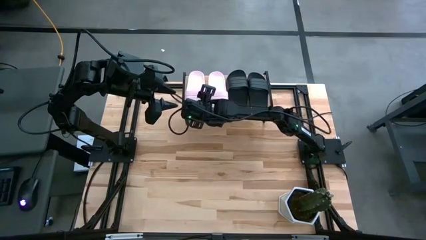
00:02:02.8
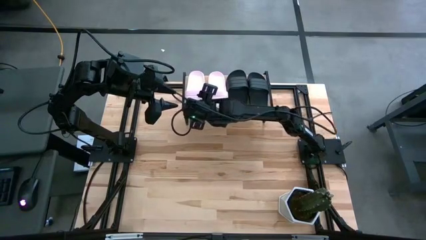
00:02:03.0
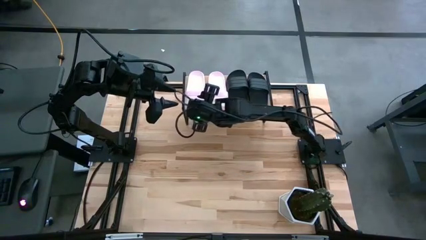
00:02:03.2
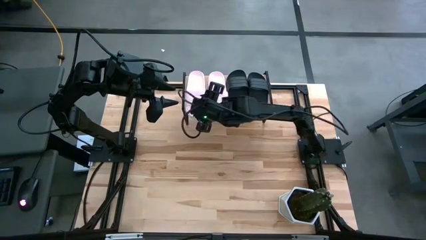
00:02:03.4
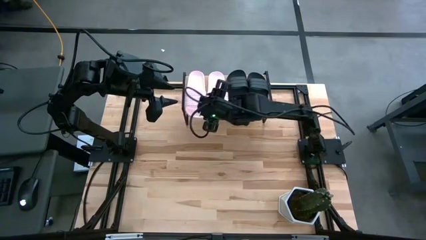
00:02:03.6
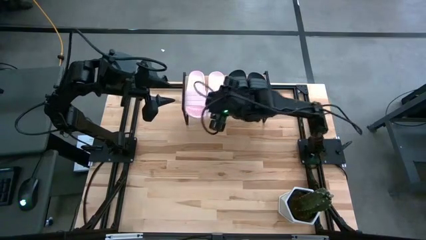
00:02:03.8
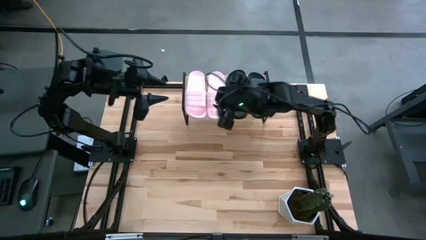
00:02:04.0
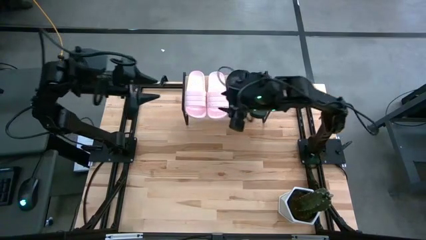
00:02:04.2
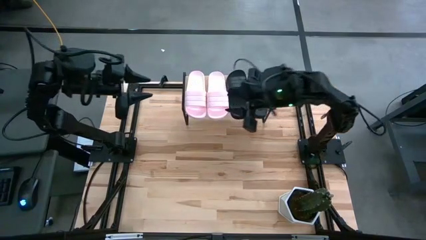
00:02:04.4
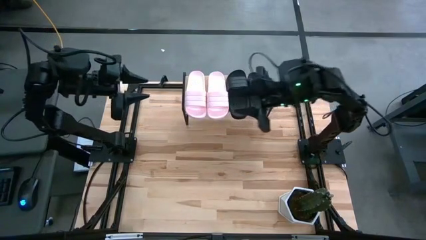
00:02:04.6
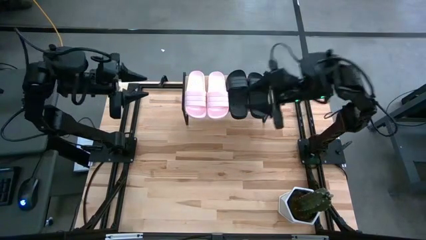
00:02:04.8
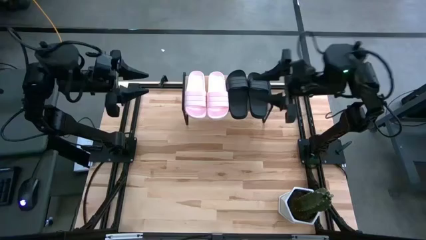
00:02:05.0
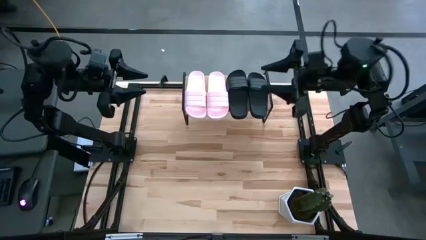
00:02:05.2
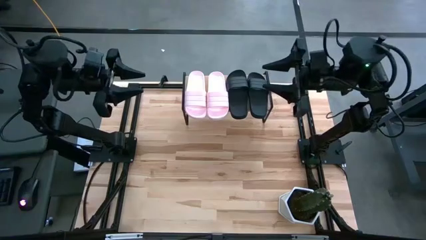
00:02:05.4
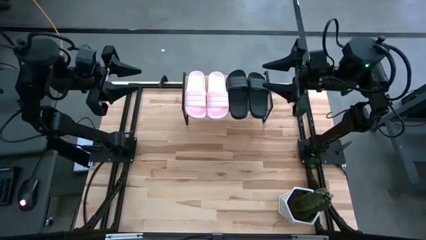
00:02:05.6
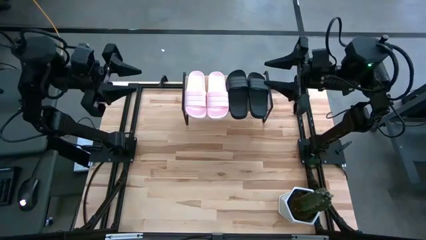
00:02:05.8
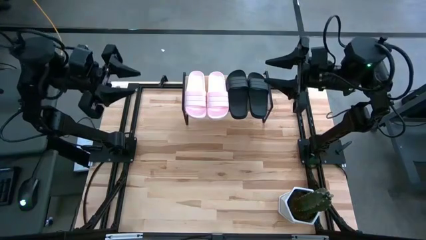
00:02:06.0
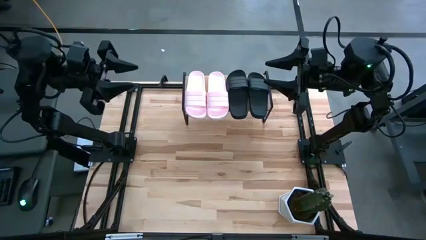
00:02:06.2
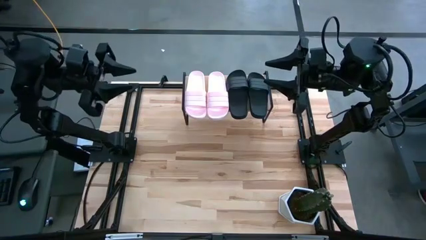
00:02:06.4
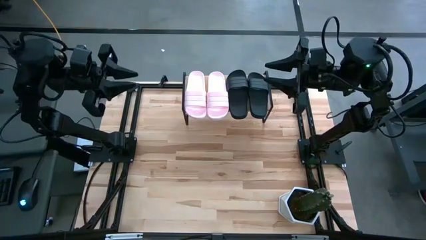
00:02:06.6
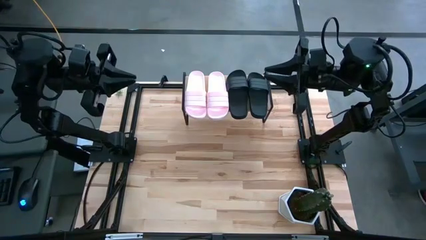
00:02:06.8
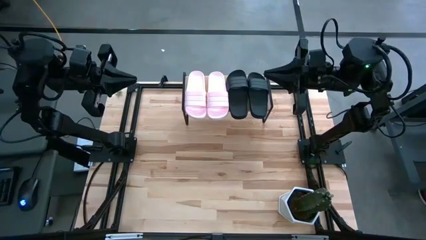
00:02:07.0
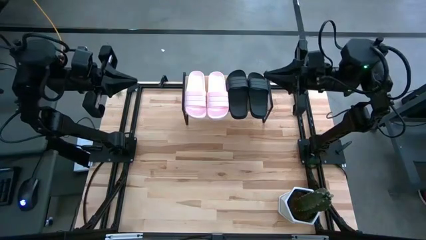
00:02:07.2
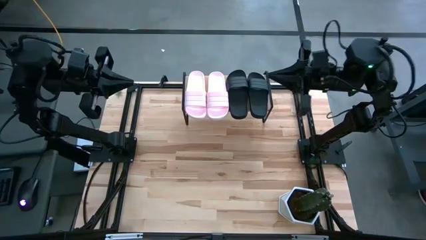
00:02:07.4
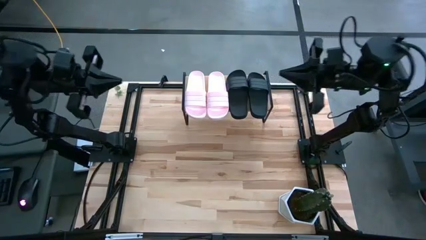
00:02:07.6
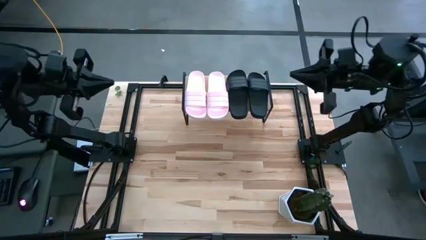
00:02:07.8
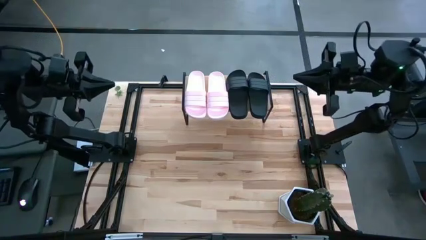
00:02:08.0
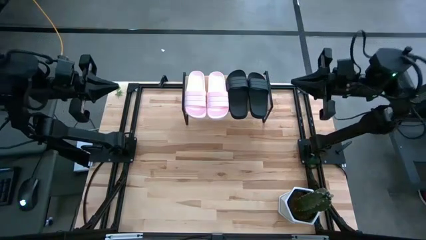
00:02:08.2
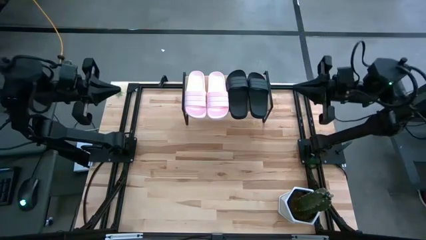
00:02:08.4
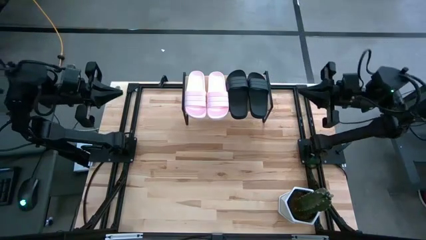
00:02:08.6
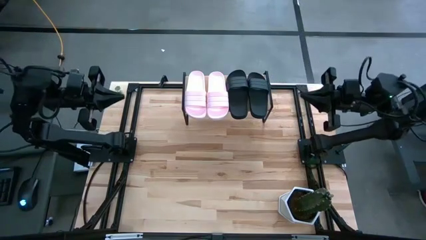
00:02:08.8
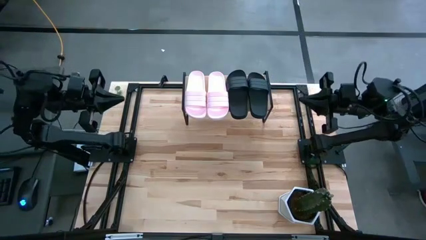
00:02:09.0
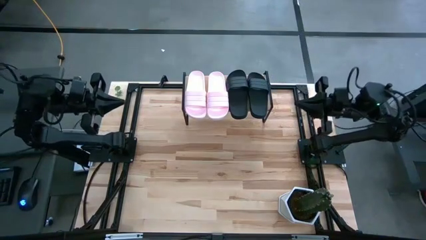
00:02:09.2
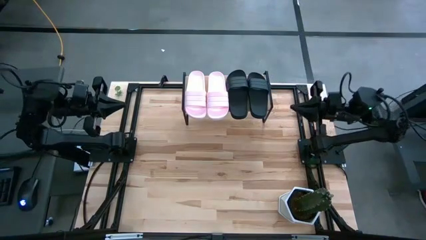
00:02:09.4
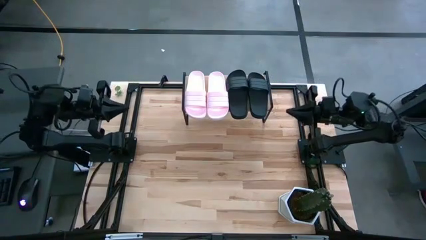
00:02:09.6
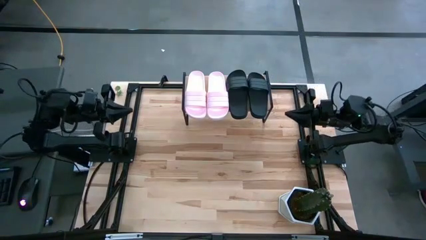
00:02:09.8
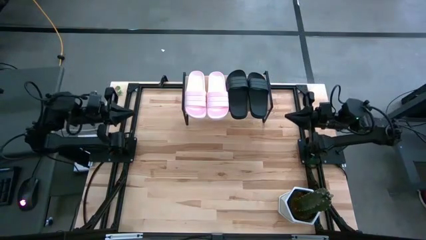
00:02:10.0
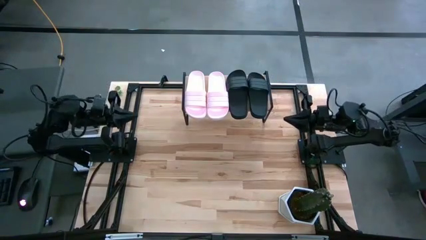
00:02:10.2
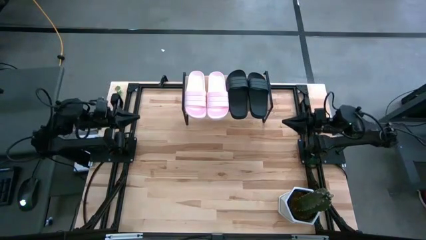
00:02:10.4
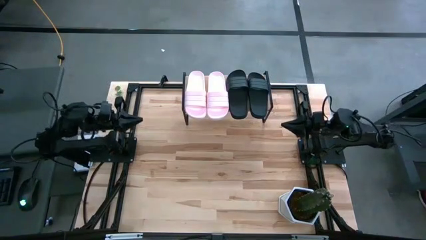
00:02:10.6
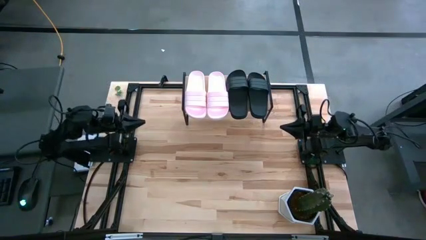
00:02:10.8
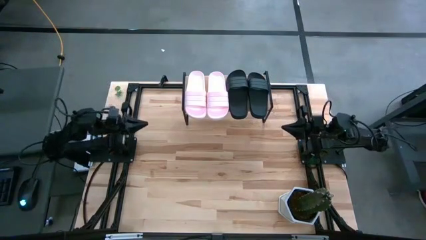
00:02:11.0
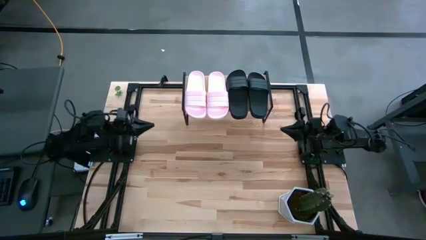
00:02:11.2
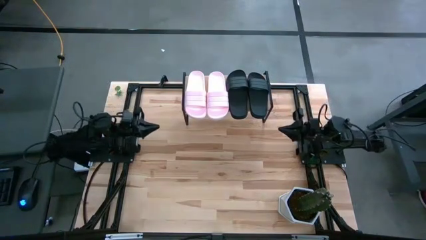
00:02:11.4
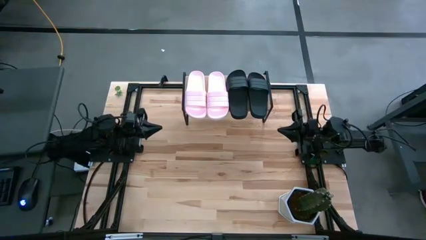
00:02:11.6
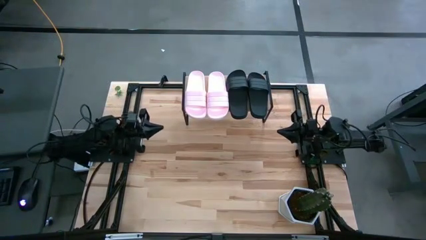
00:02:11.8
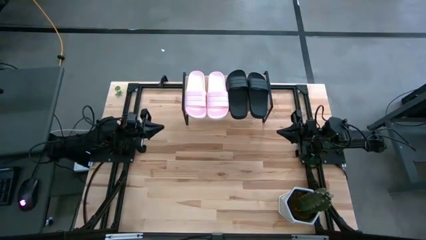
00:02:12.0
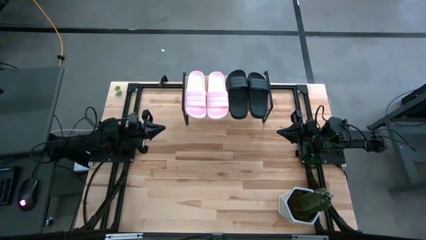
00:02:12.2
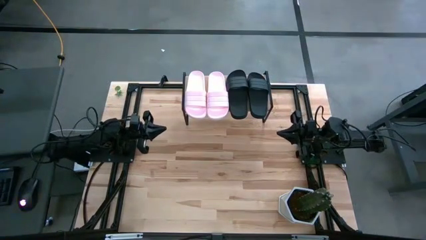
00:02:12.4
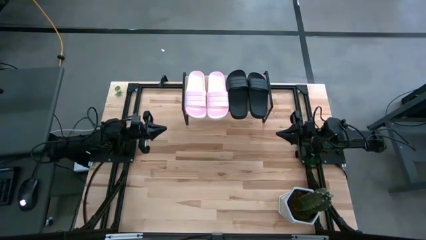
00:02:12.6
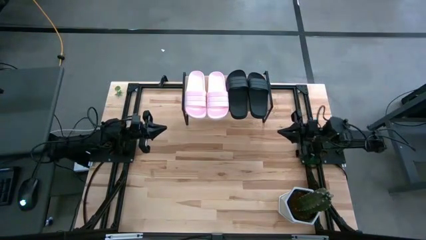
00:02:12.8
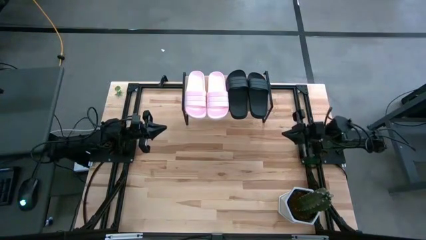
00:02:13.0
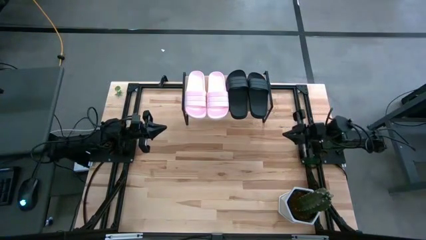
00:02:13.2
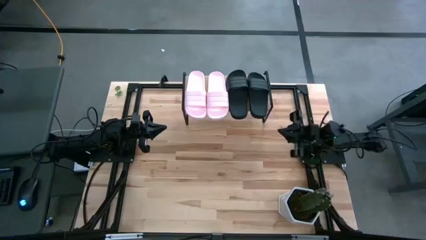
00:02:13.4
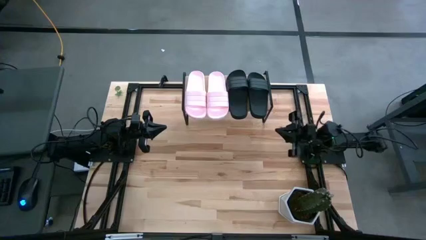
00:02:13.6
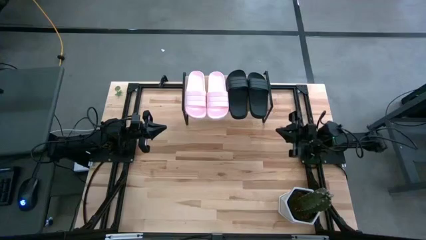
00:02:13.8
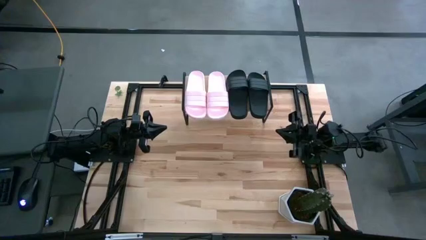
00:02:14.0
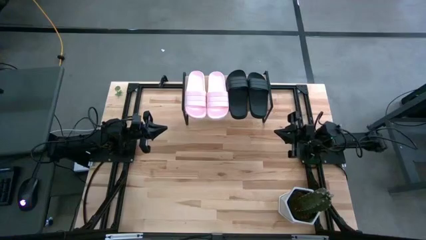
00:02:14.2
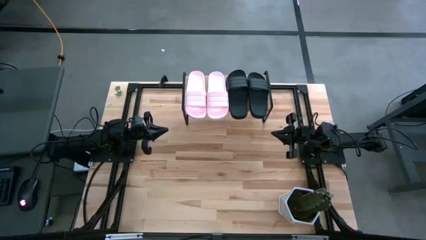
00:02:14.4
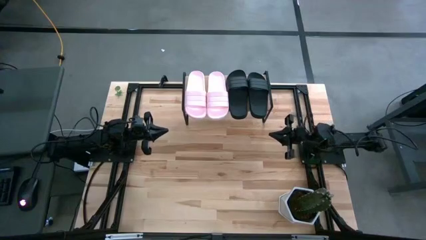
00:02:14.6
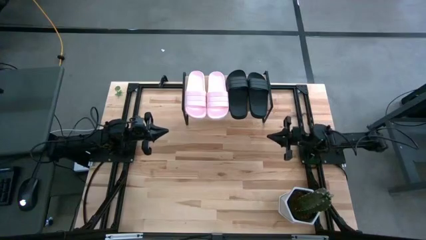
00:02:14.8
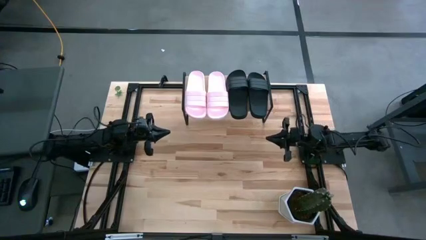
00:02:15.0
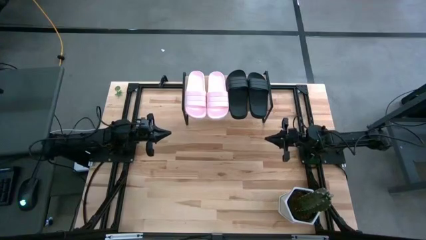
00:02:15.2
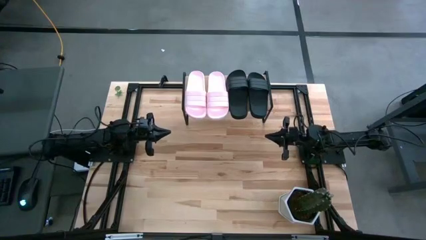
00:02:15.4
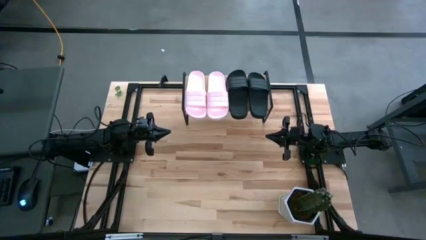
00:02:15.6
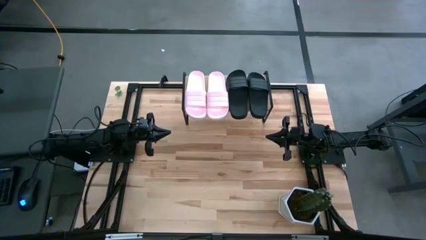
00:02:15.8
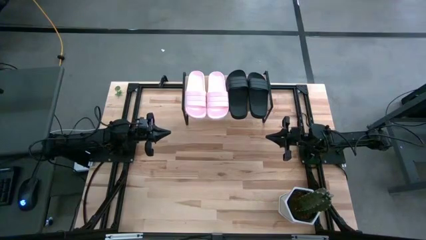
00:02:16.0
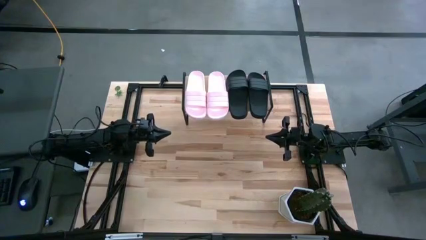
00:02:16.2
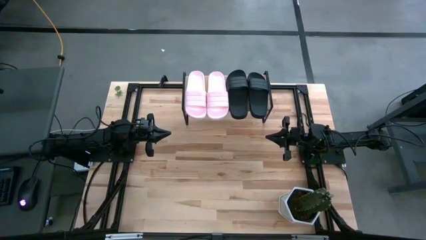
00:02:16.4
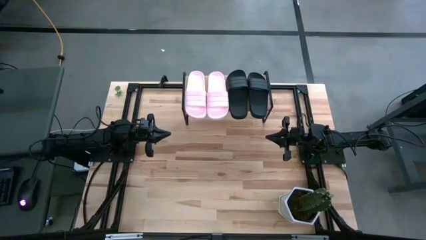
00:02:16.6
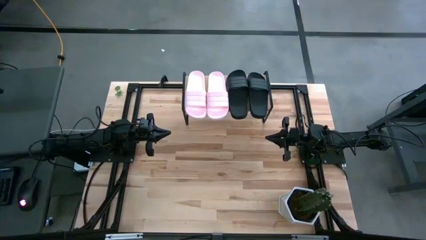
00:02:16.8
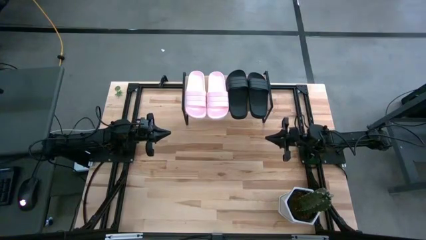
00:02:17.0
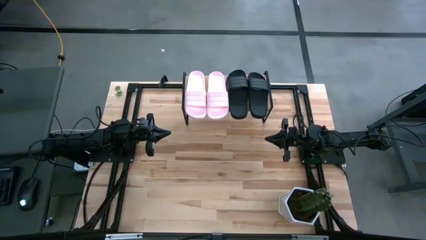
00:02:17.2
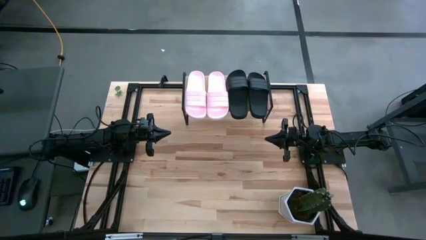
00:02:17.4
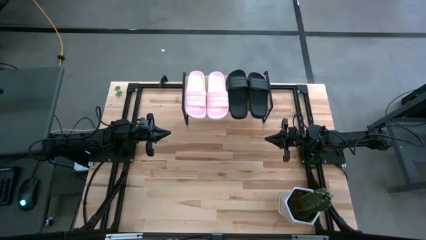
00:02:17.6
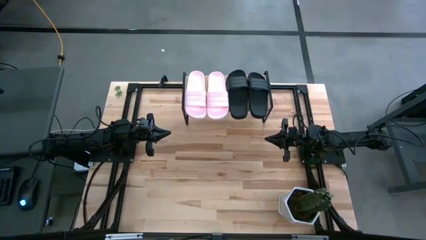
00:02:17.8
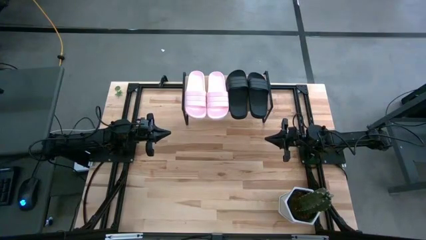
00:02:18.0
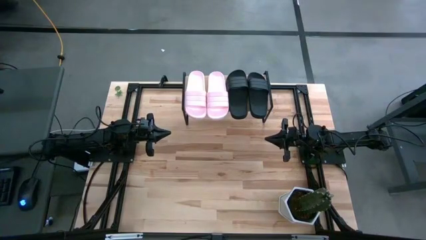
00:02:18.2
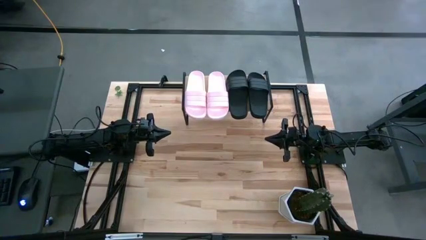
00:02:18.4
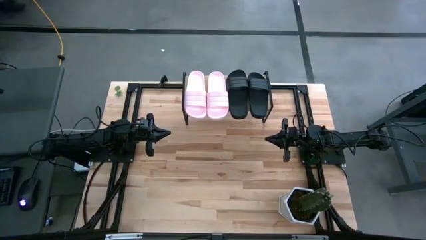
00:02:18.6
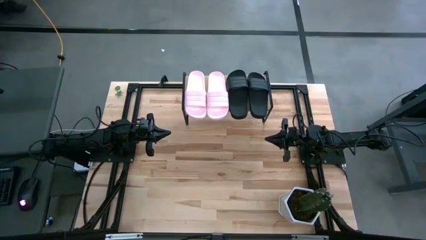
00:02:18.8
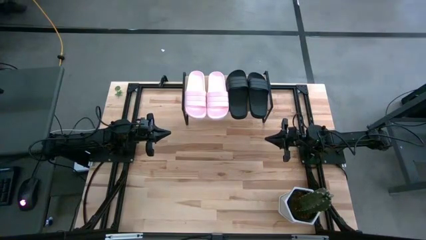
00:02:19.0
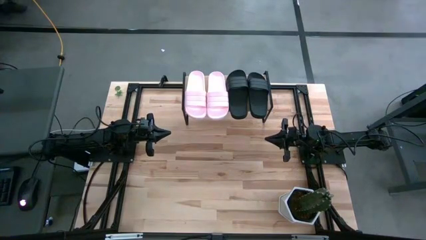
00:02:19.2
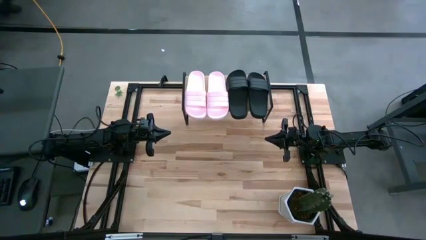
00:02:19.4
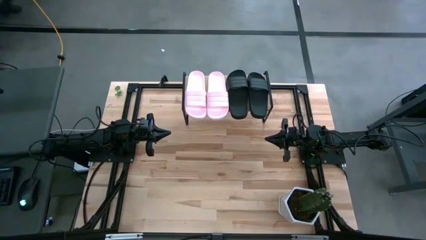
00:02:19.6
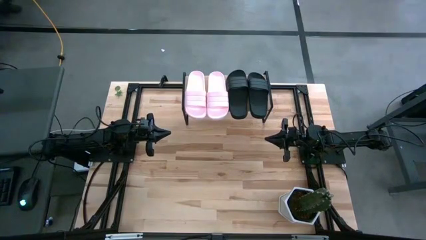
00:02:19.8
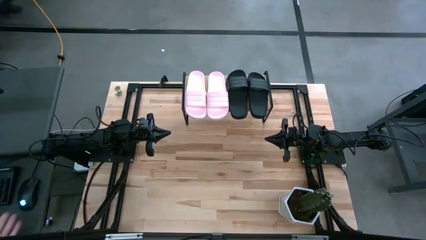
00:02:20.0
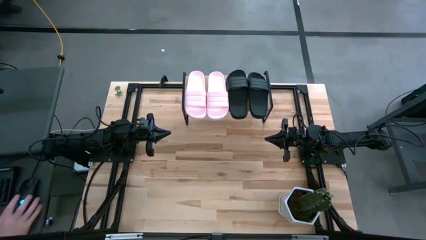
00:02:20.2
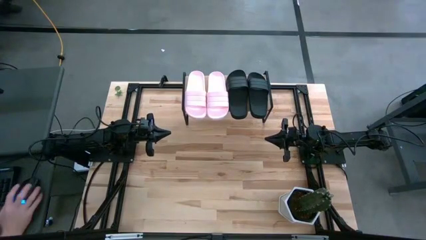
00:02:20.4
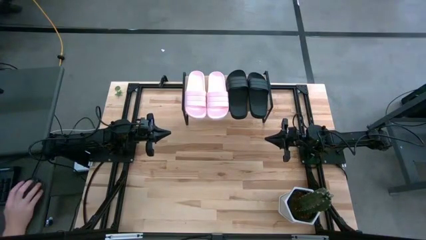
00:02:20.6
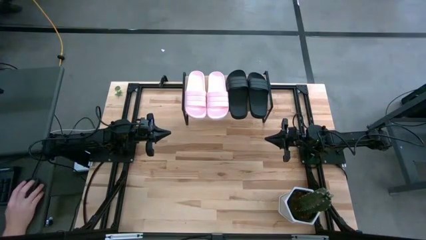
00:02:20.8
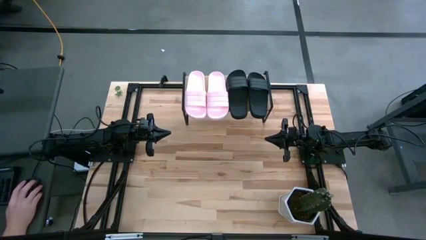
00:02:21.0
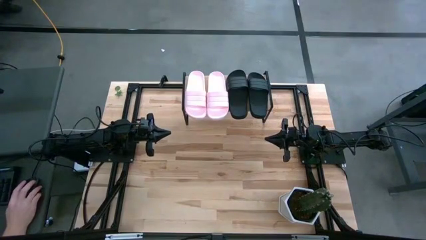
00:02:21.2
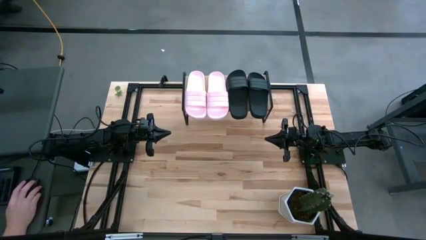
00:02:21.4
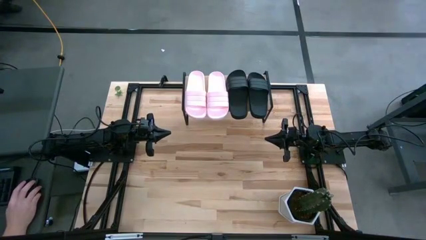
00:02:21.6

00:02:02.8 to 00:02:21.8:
Task: Pick and place slides into the shelf
Return to Home Position
